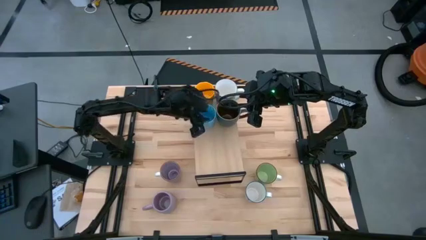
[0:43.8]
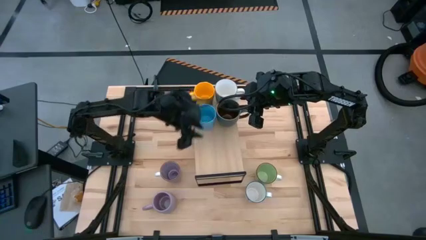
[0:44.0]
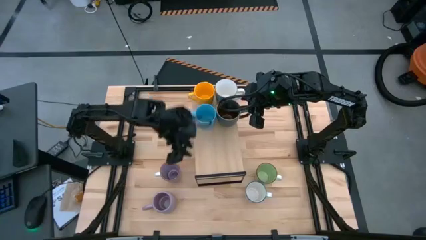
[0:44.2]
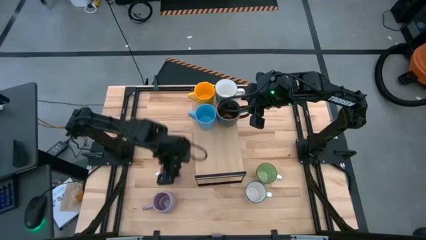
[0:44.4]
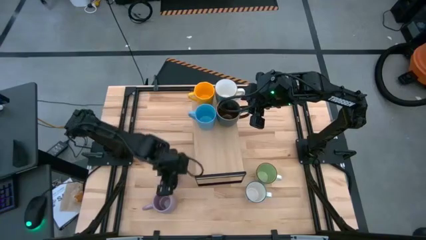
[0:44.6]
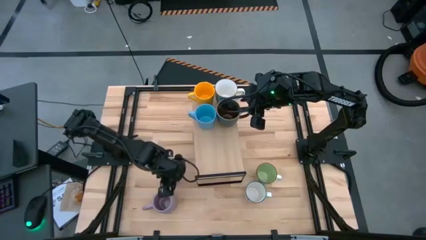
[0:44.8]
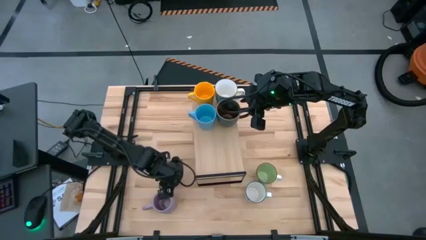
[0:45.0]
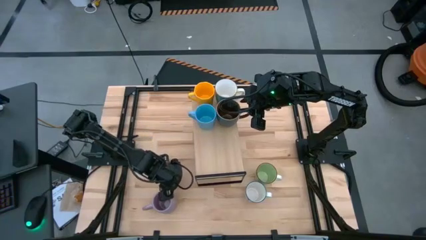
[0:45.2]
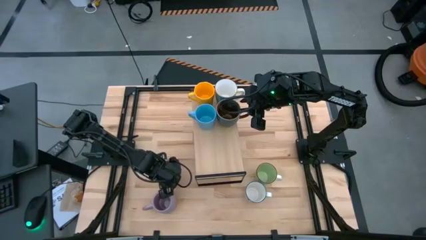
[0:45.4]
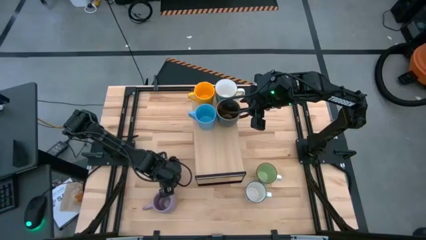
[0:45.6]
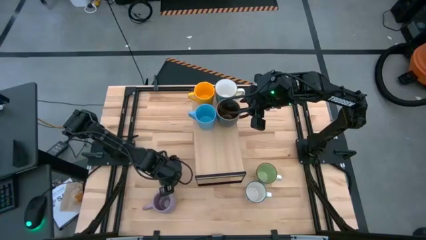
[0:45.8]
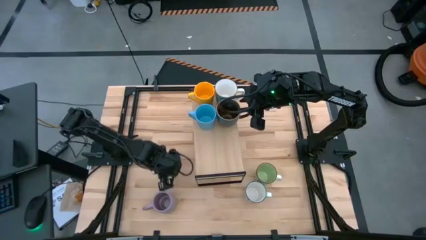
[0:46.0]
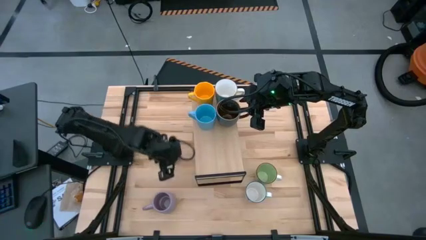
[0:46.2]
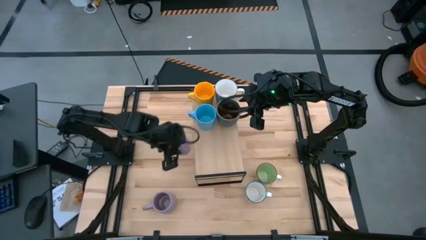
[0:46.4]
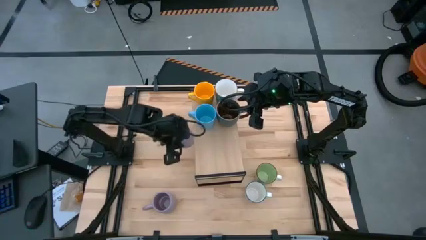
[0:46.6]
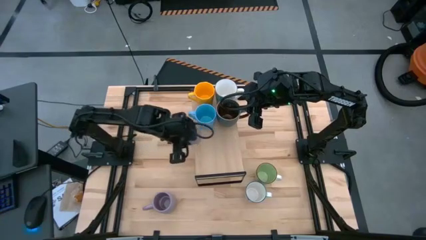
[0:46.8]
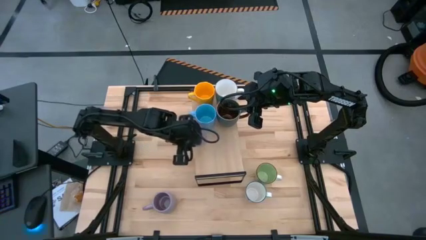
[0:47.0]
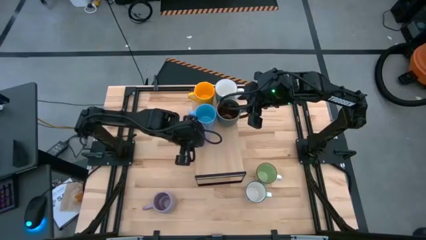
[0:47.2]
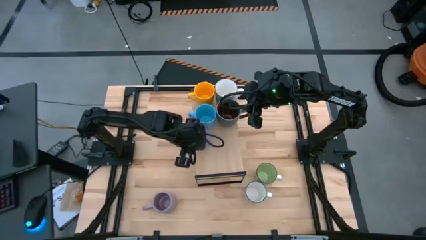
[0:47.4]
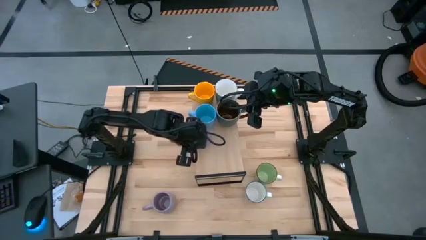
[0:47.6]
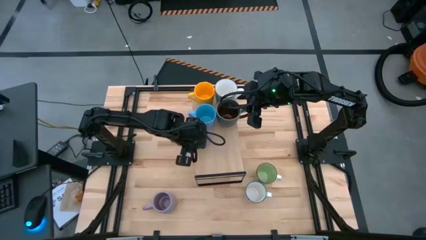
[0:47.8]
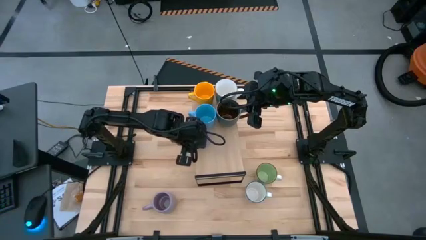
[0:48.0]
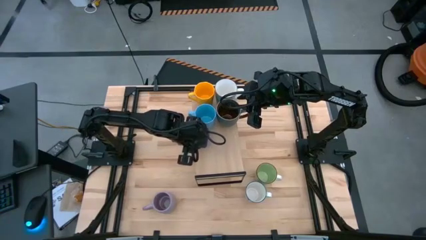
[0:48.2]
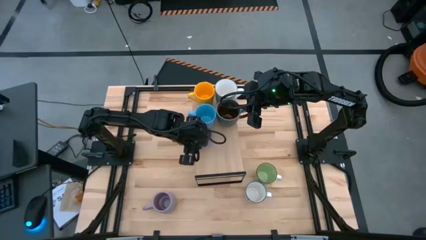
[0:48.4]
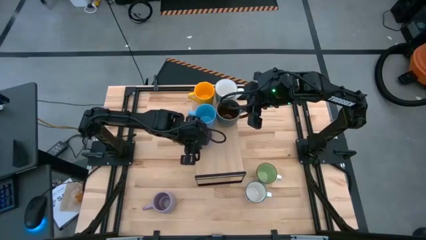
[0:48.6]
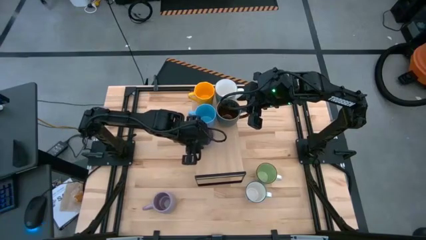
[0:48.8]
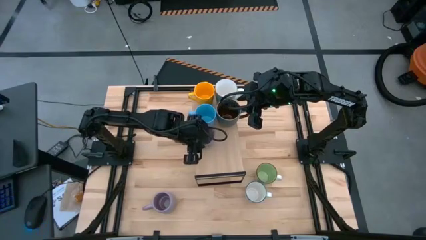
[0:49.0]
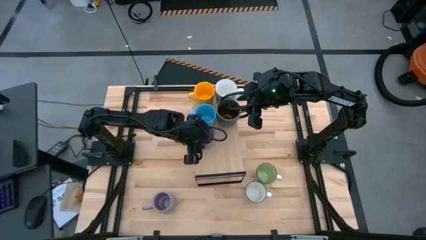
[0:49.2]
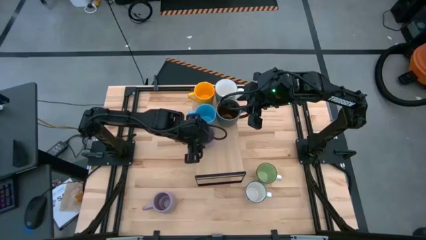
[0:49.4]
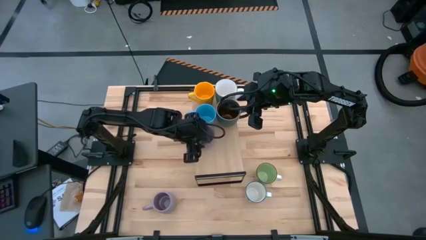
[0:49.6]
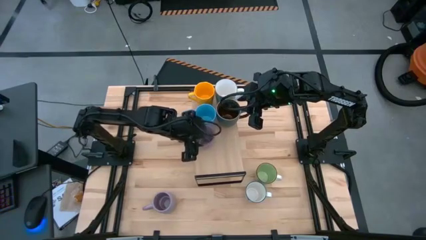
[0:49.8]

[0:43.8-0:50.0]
Task: Place coffee mugs
Put the top purple mug on the shelf

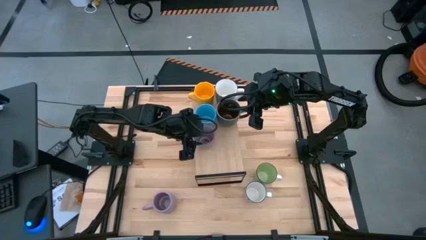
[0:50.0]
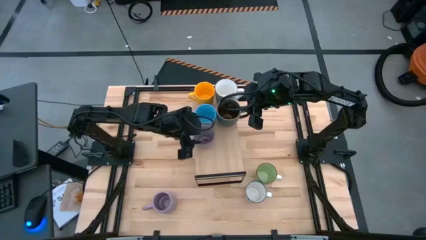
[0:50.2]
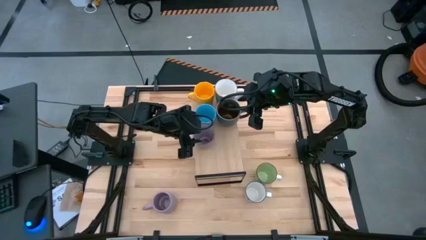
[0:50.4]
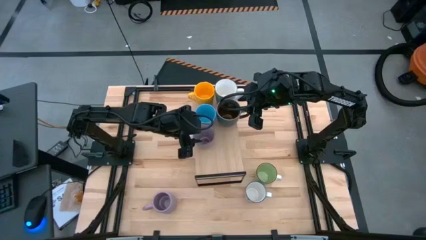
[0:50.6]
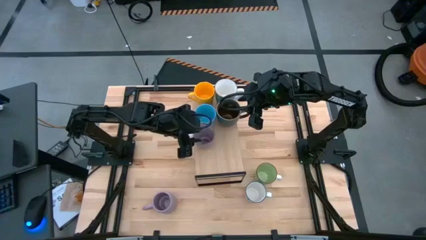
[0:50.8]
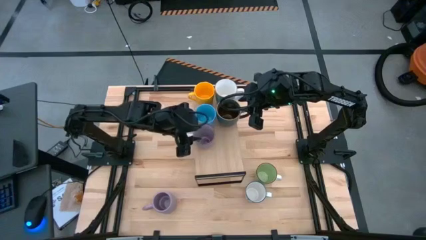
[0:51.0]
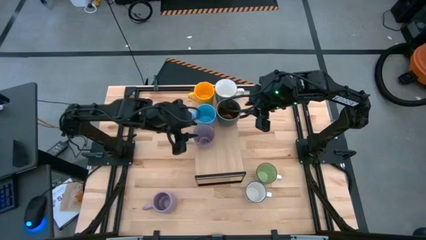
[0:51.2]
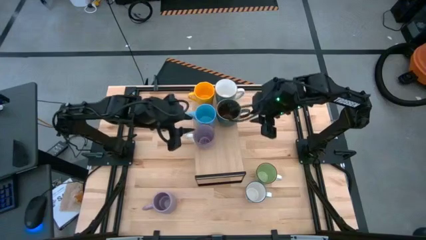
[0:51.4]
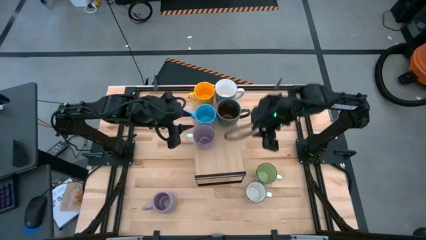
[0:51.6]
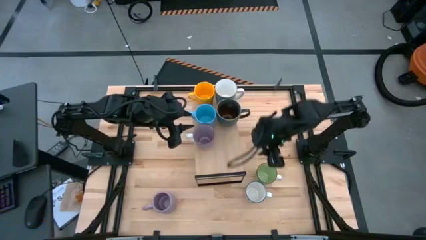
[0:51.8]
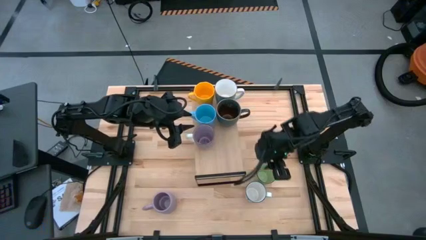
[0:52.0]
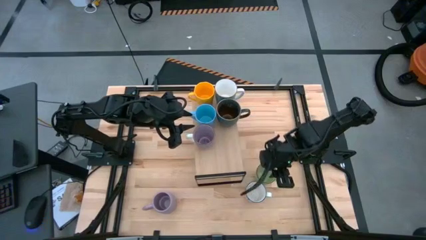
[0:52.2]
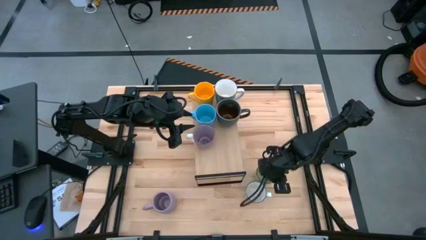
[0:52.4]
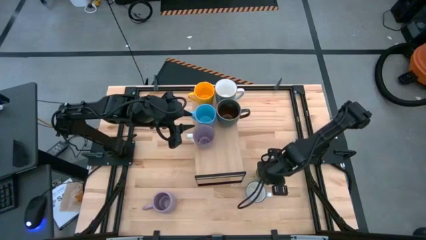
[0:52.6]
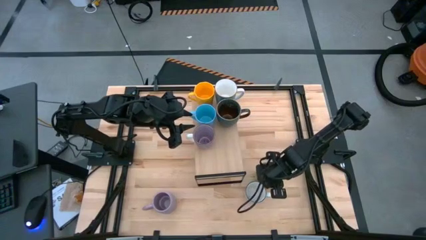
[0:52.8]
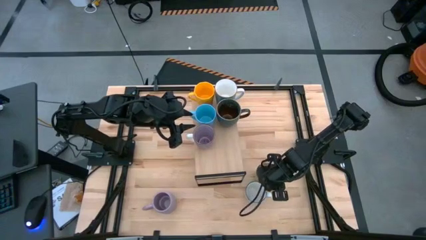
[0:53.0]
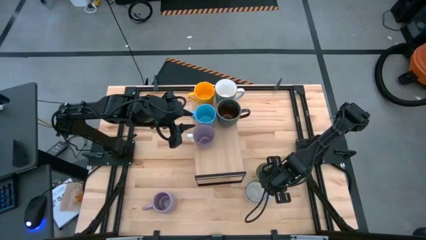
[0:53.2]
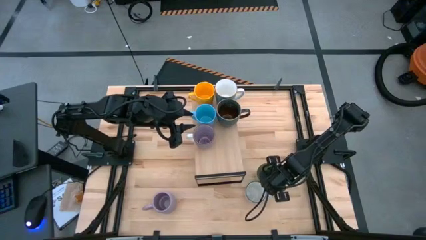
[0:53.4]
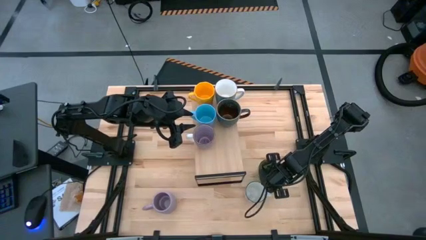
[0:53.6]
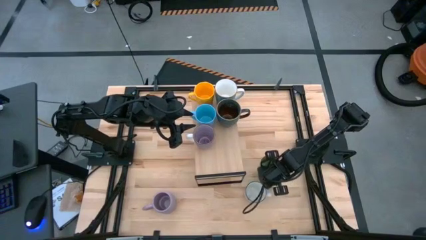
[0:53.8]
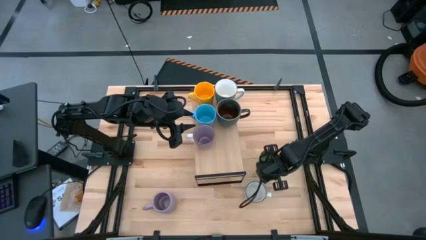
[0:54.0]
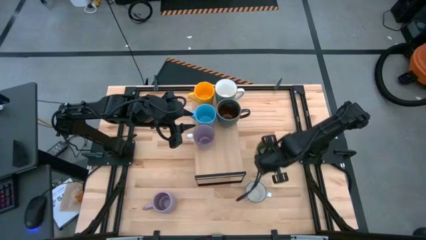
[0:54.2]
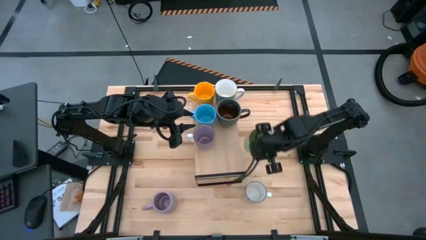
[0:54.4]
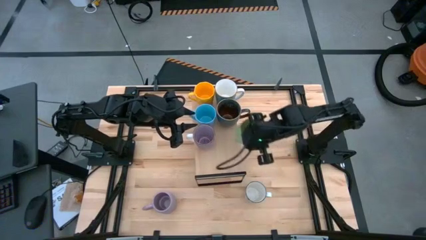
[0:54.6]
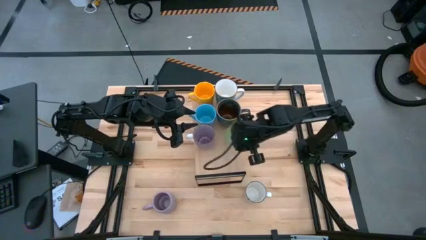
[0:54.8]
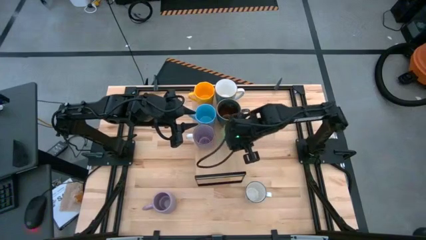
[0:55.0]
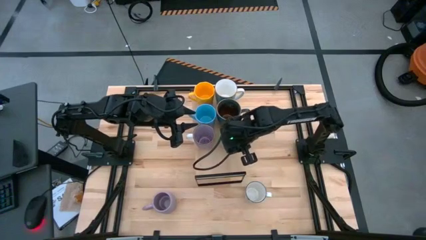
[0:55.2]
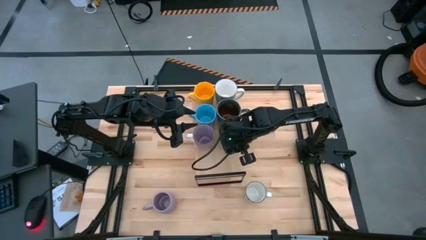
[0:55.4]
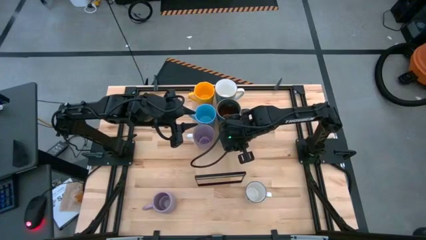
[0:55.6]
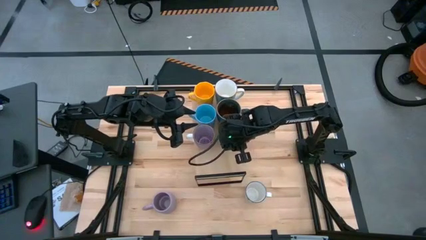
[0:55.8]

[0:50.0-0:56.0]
Put the green mug on the shelf

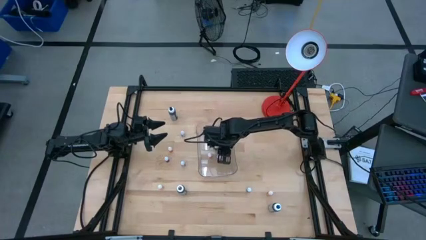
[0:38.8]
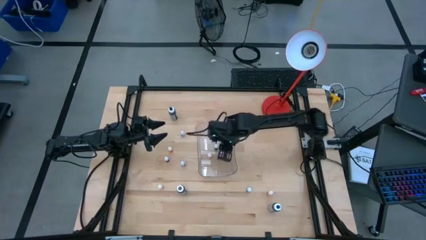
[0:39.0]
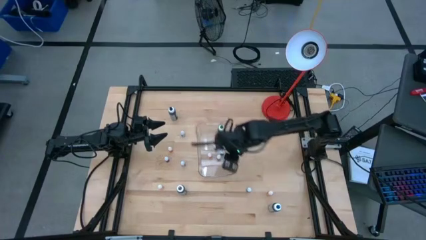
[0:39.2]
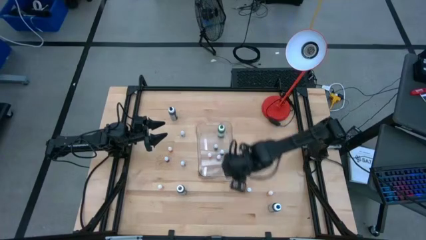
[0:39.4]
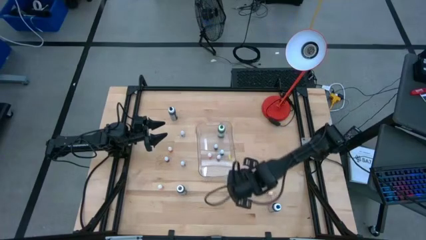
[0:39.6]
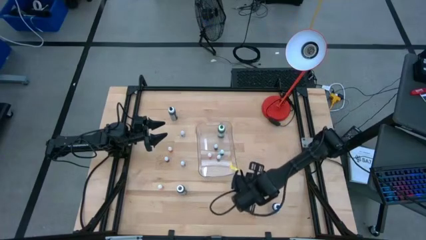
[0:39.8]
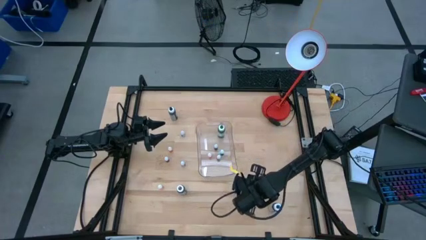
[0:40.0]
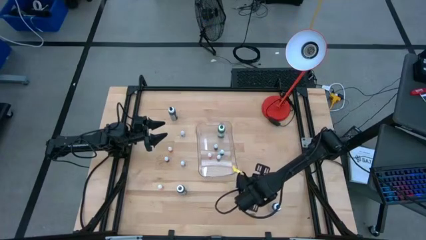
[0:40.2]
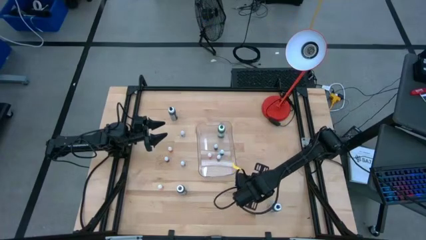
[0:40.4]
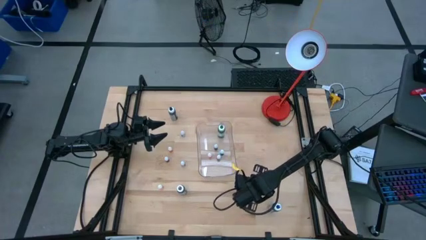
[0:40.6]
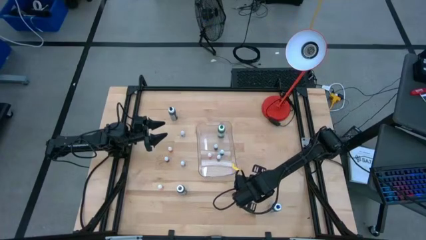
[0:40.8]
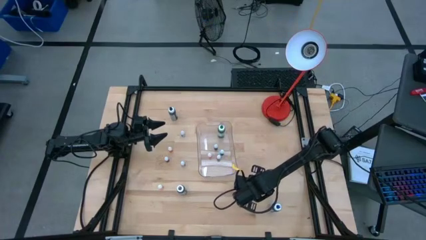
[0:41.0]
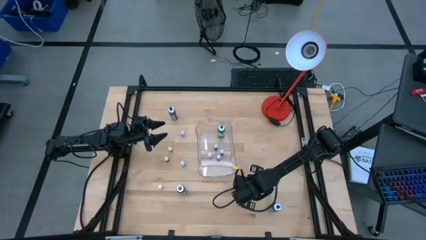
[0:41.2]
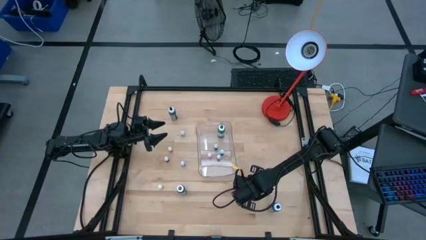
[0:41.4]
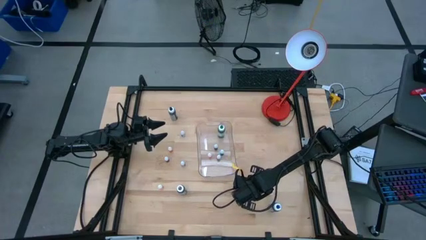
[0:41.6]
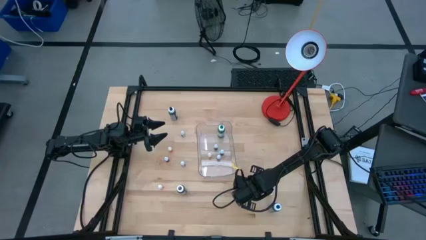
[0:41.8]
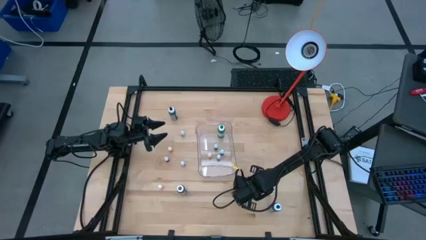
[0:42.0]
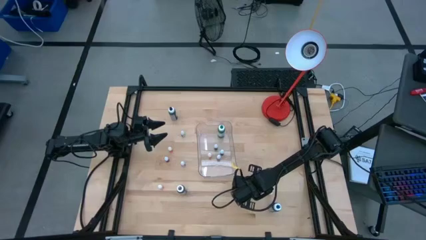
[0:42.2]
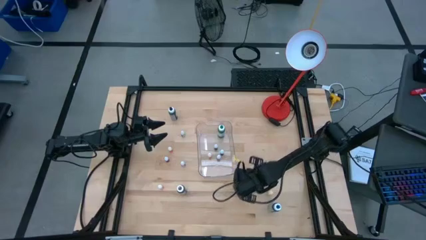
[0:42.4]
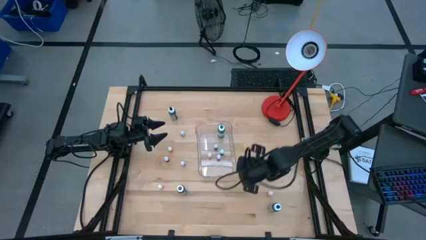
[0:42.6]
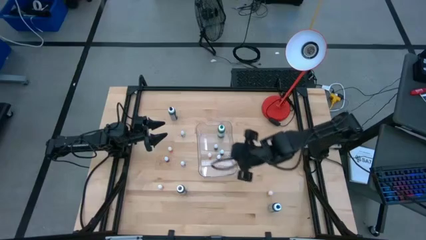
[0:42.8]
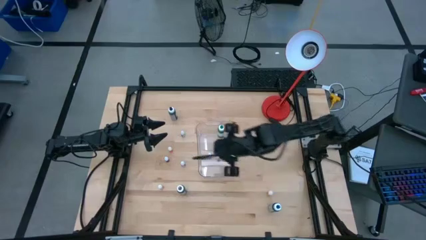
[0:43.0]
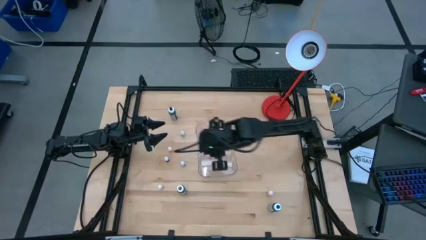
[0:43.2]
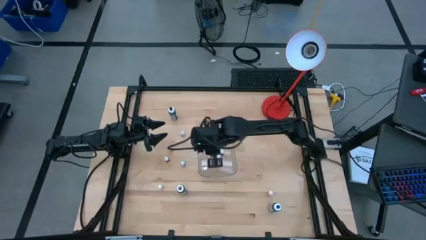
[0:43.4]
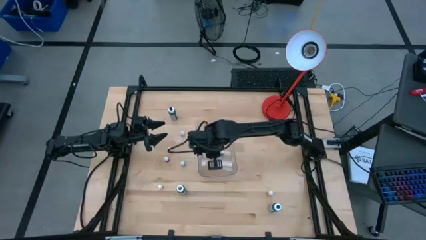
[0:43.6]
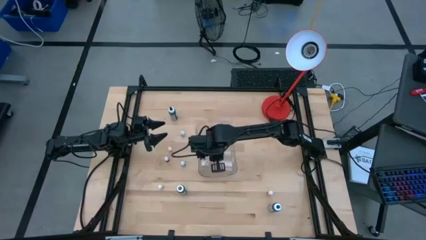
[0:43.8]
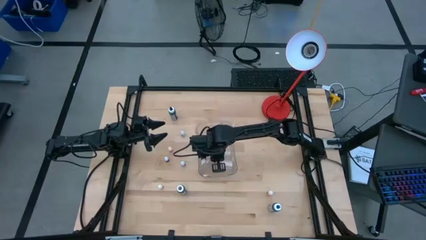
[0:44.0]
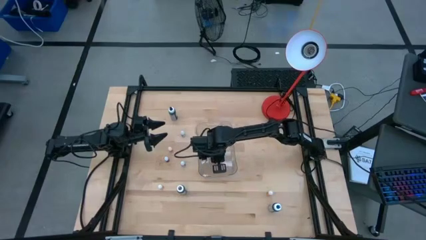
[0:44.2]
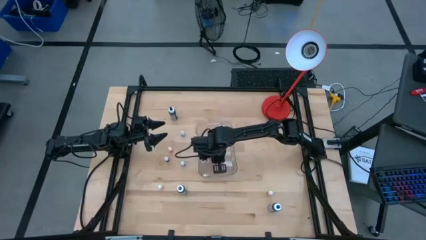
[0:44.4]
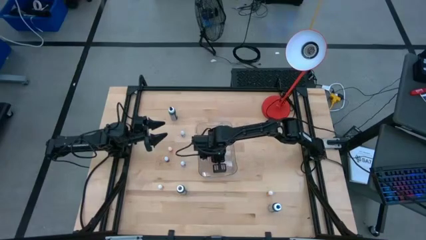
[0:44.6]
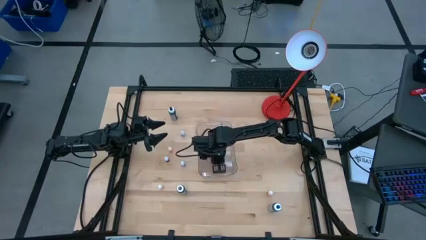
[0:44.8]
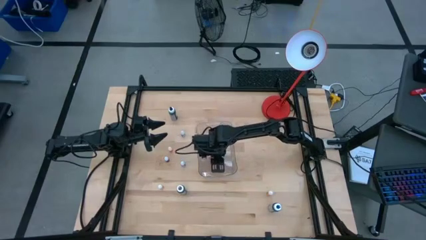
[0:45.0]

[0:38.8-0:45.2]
Task: Pick & Place food coloring
Put the small purple food coloring bottle into the transparent bin
